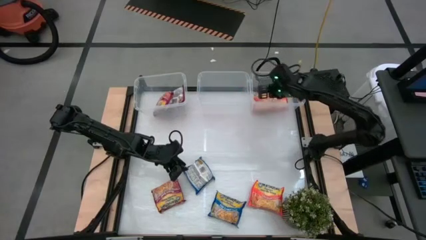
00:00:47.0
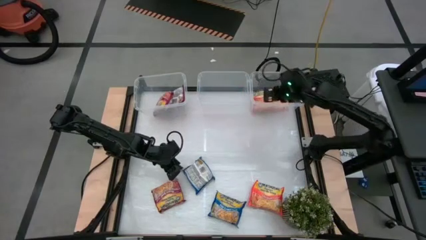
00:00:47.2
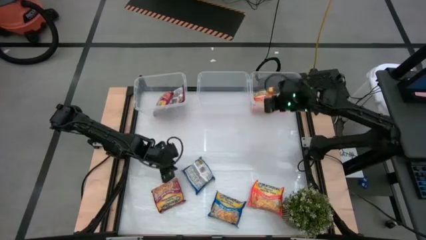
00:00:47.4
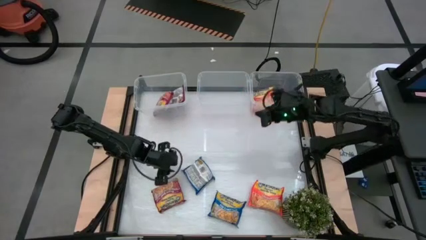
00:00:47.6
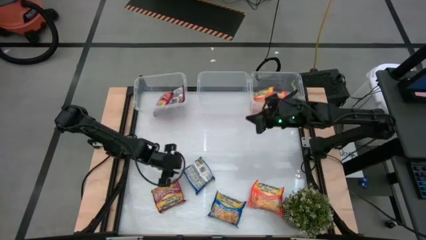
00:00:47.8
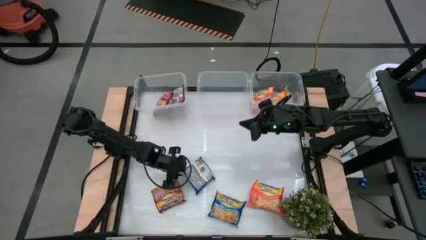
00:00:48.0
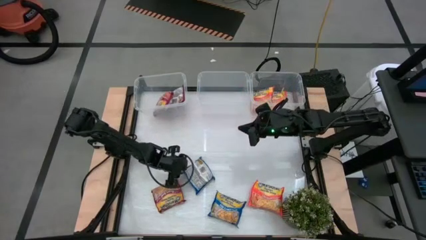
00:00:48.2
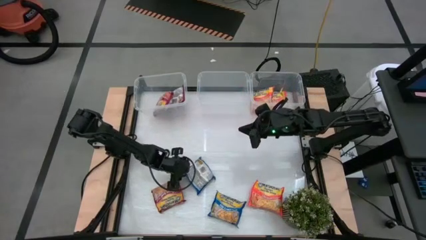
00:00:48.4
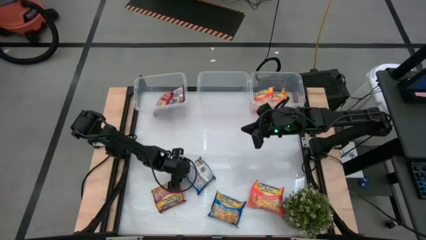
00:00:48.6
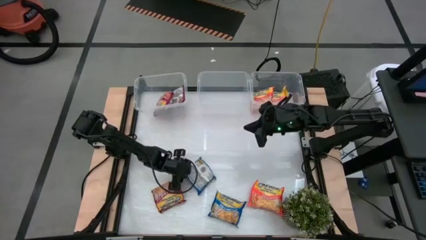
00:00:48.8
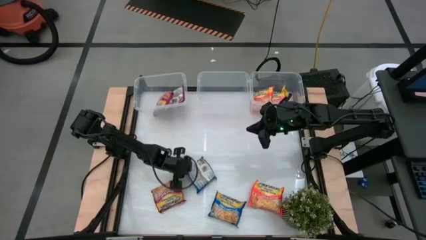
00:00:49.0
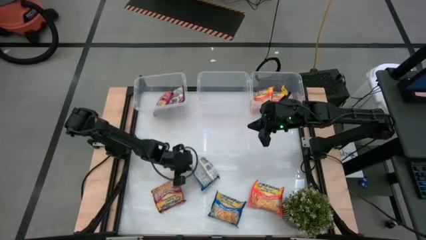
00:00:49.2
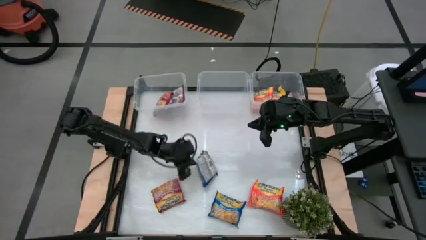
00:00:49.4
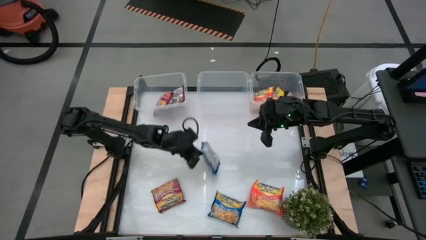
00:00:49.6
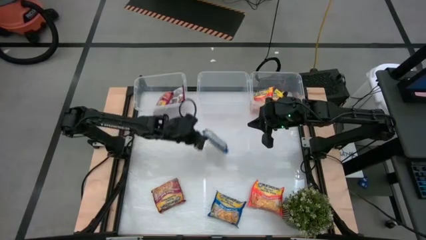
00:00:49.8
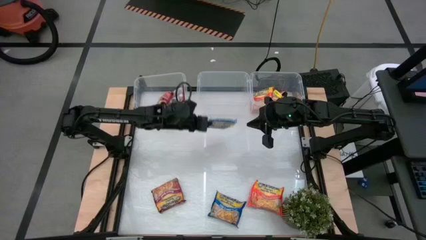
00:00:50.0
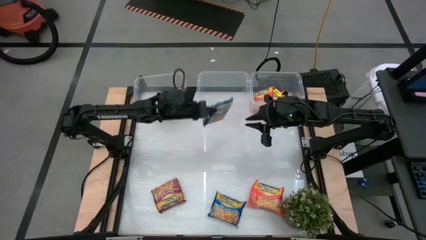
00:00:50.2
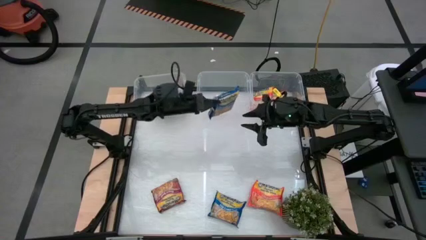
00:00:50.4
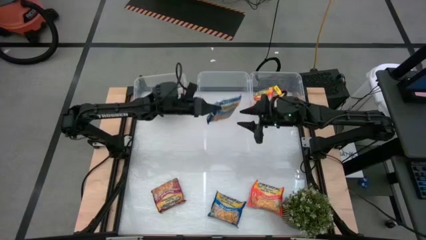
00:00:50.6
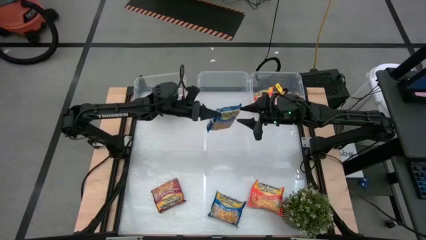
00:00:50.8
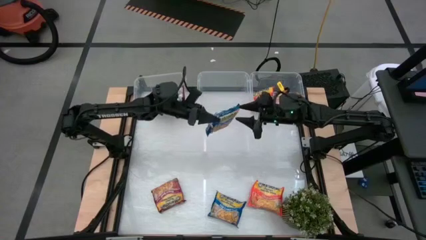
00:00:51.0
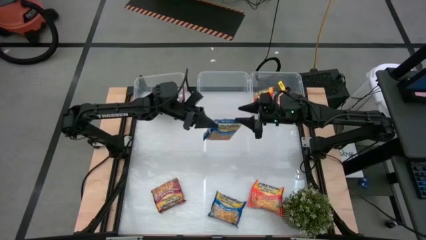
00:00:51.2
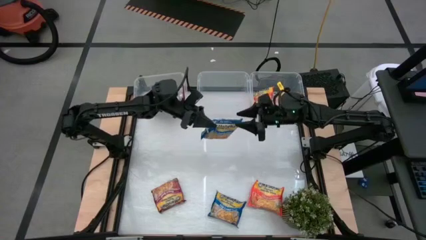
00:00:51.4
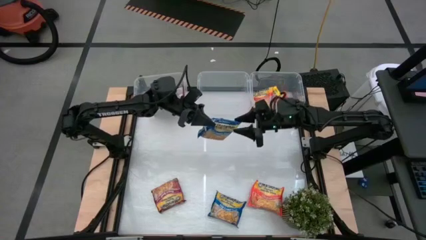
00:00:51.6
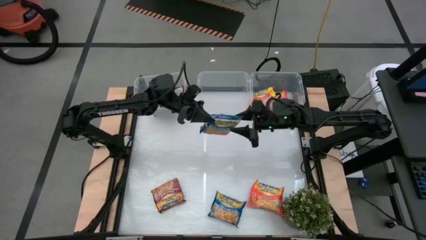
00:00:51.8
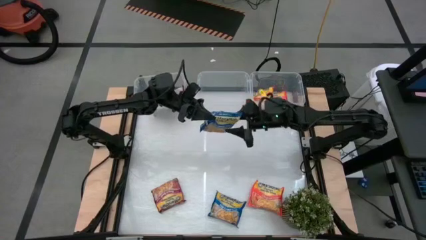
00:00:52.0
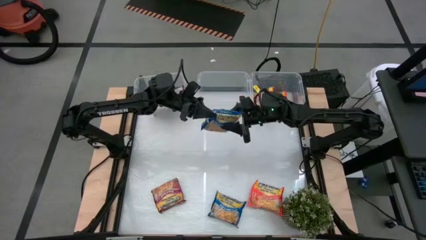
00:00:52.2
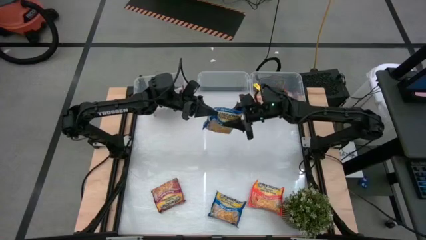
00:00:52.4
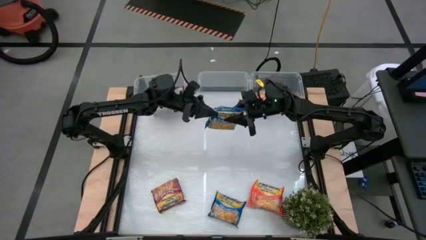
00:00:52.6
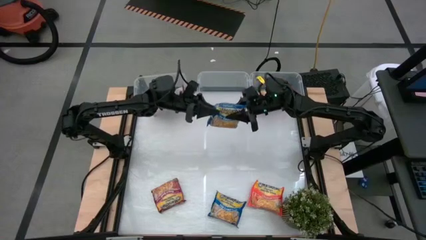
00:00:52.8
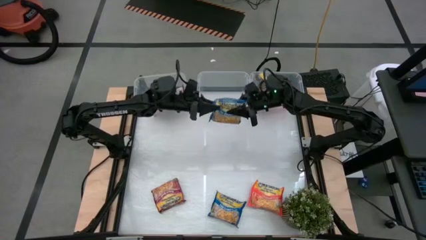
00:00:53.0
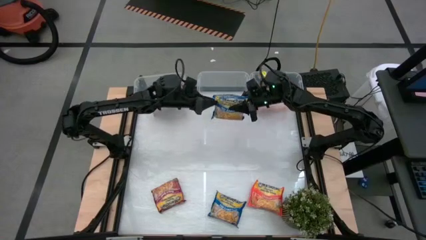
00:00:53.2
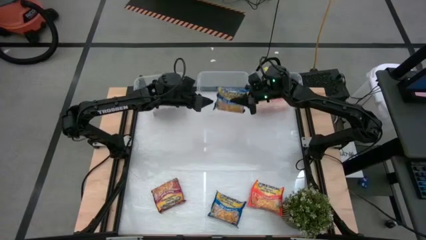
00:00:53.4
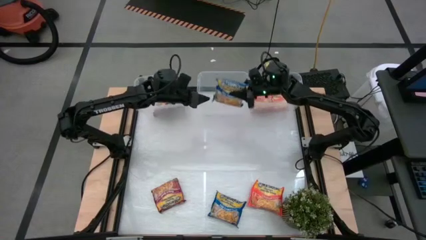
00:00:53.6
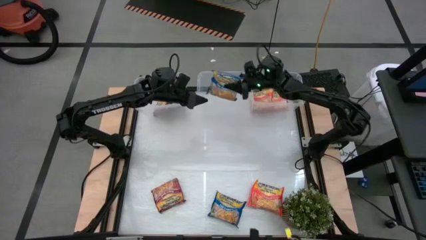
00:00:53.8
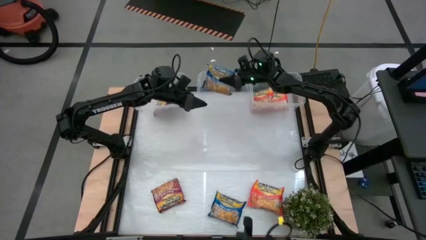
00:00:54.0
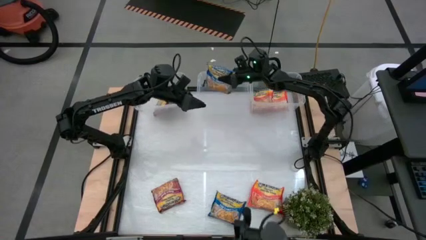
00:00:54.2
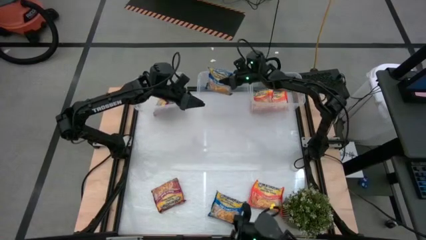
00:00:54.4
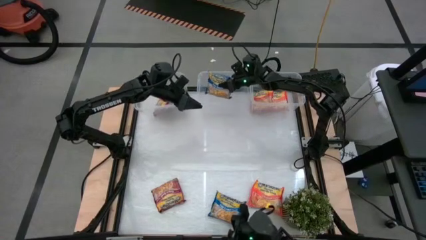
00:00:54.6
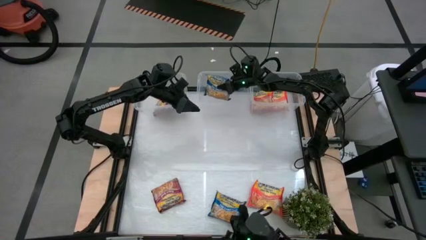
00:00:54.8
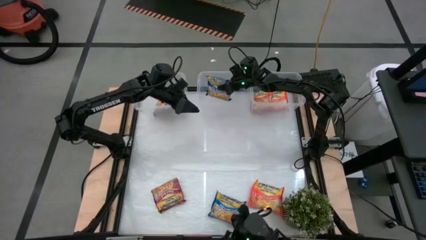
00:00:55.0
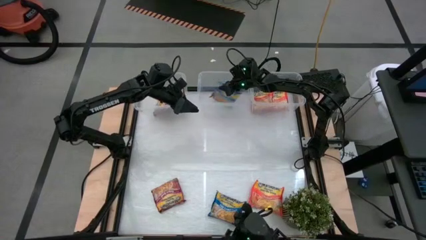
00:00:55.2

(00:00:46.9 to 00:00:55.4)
Task: Sort Maruchan noodles
Put the top blue noodle pack into the middle transparent bin

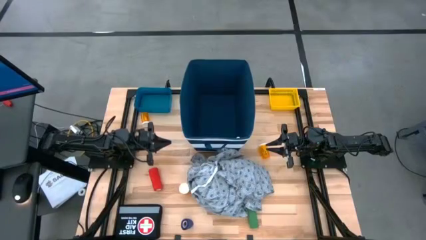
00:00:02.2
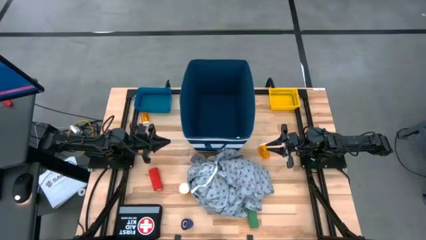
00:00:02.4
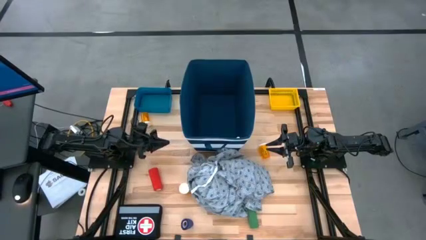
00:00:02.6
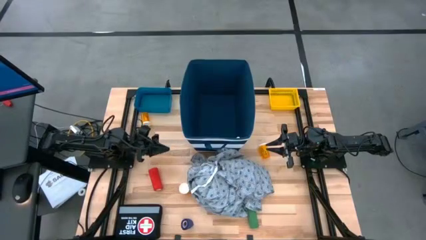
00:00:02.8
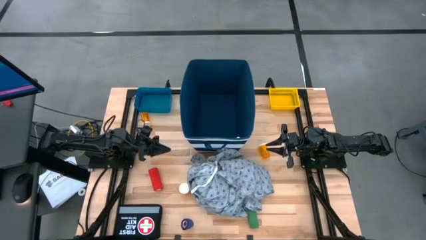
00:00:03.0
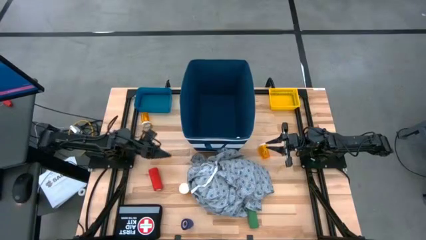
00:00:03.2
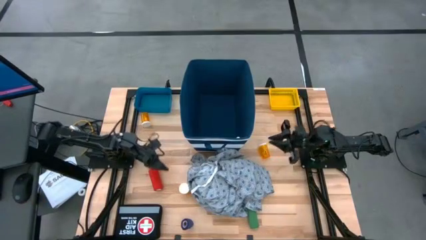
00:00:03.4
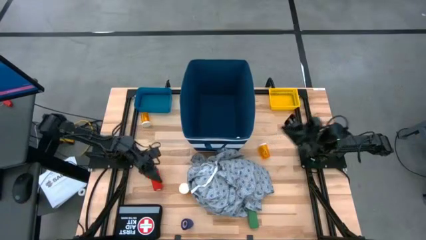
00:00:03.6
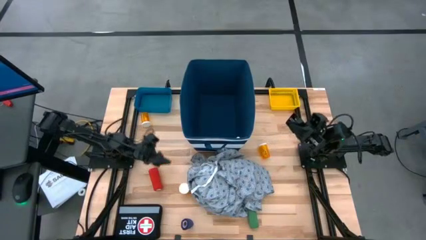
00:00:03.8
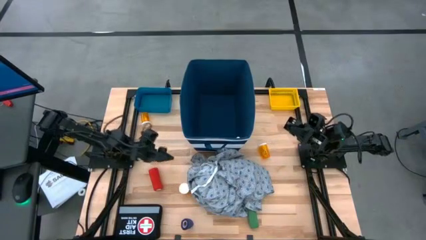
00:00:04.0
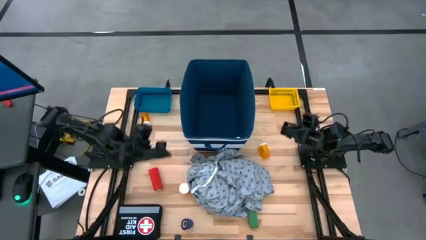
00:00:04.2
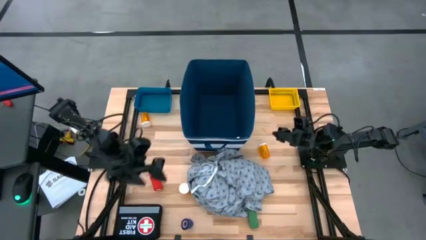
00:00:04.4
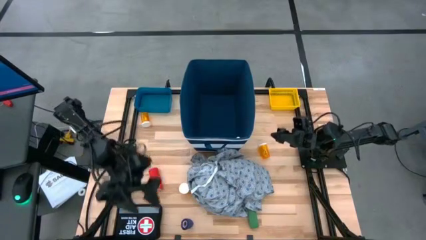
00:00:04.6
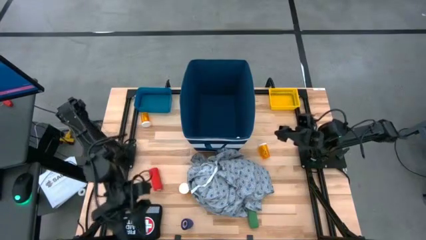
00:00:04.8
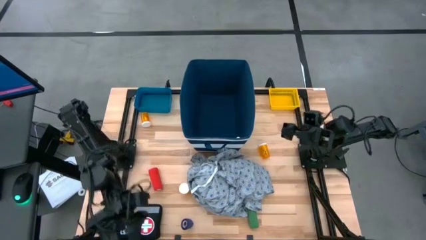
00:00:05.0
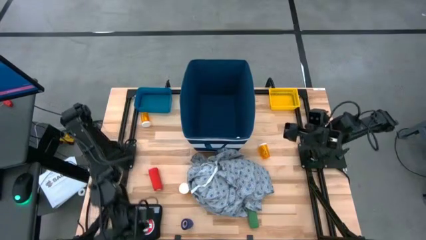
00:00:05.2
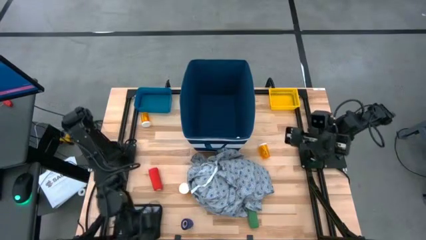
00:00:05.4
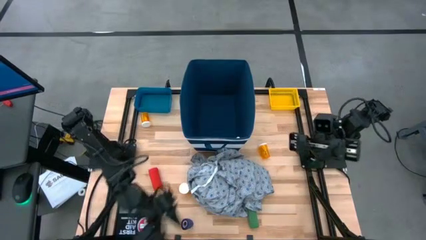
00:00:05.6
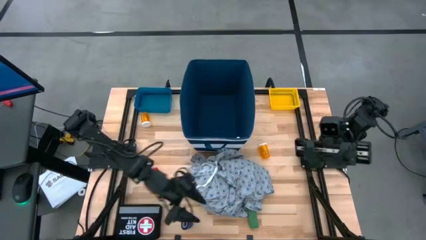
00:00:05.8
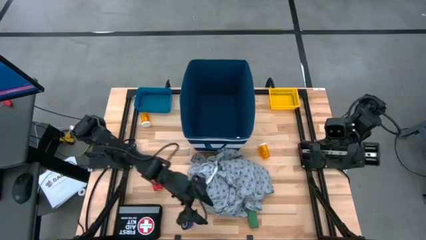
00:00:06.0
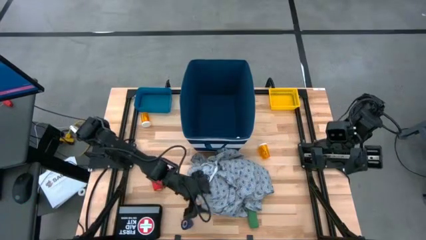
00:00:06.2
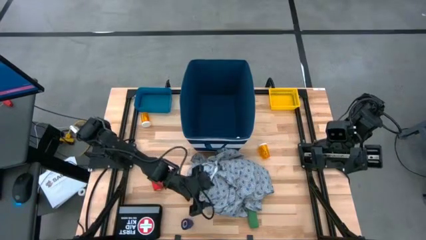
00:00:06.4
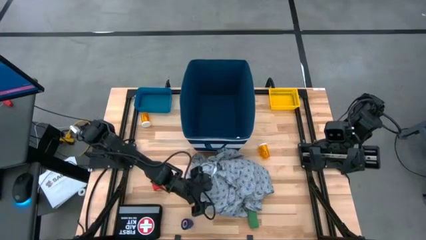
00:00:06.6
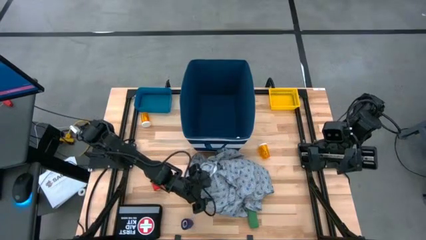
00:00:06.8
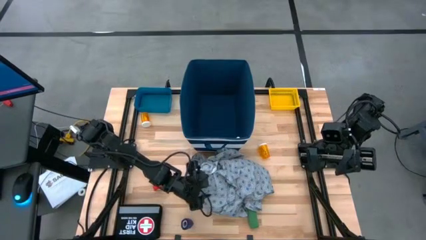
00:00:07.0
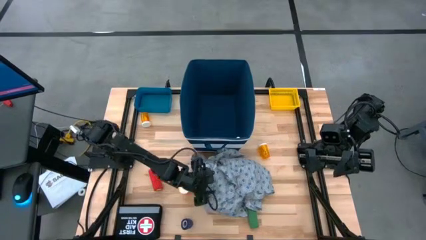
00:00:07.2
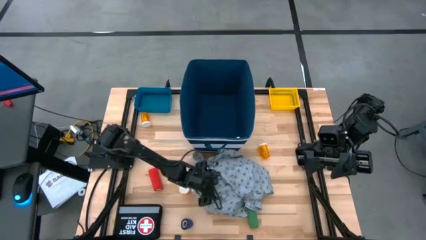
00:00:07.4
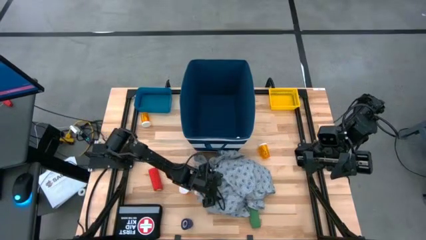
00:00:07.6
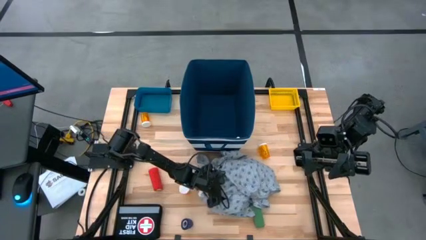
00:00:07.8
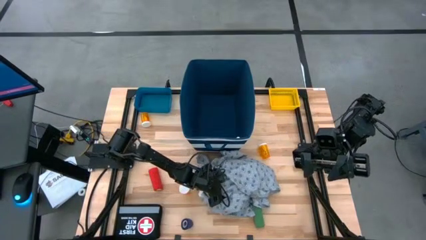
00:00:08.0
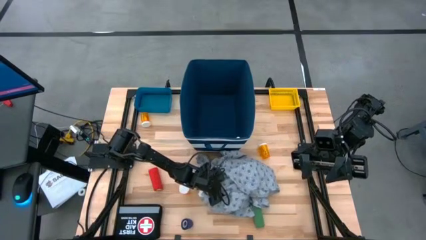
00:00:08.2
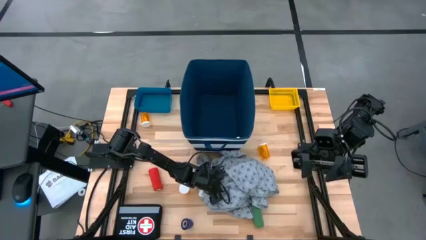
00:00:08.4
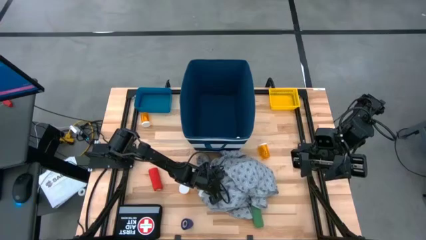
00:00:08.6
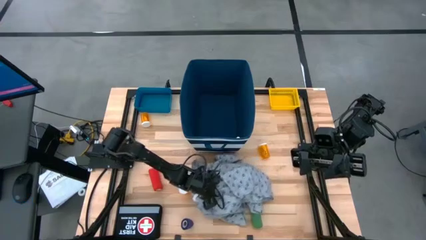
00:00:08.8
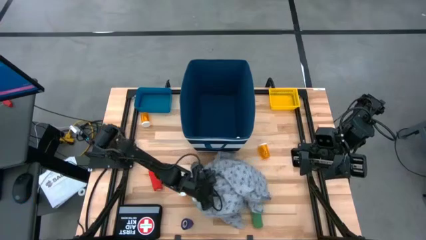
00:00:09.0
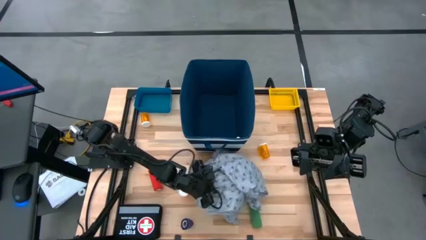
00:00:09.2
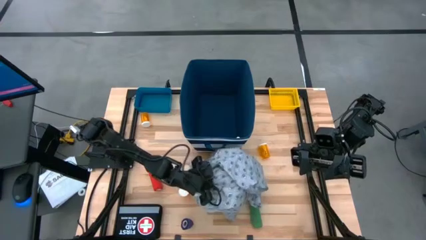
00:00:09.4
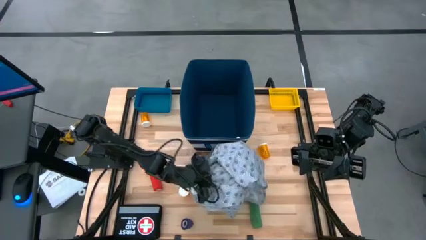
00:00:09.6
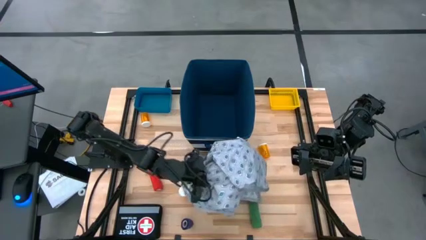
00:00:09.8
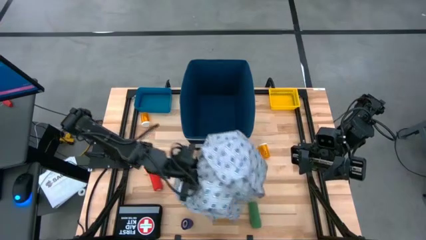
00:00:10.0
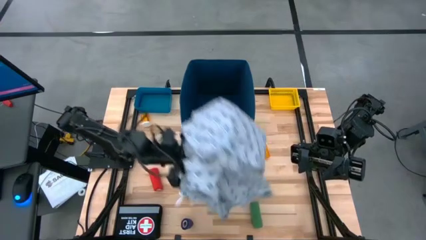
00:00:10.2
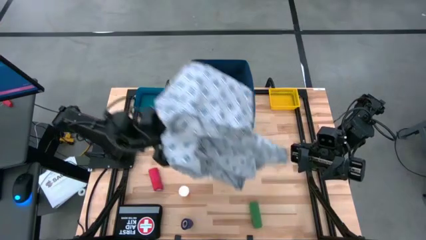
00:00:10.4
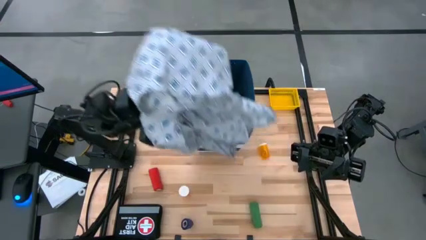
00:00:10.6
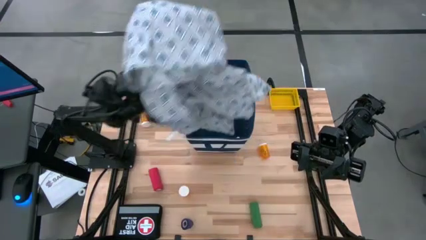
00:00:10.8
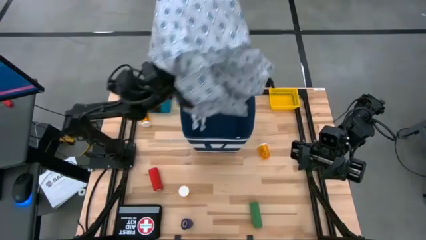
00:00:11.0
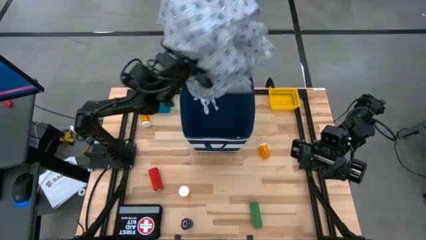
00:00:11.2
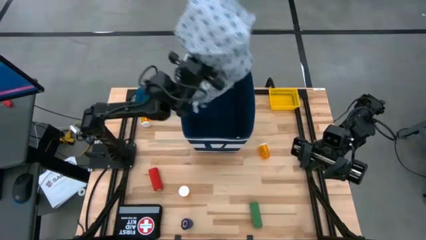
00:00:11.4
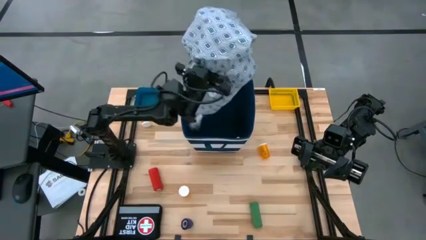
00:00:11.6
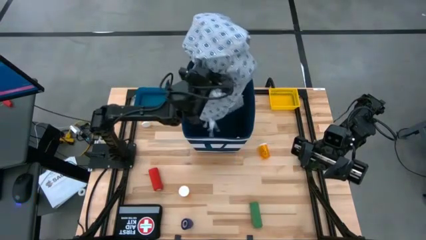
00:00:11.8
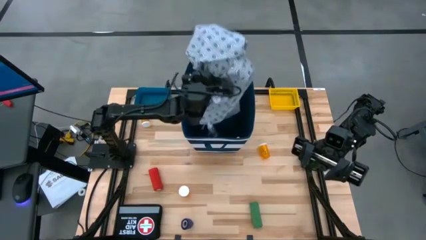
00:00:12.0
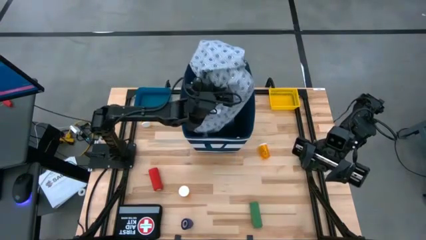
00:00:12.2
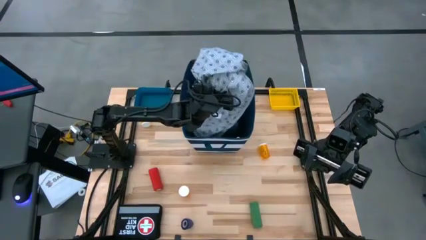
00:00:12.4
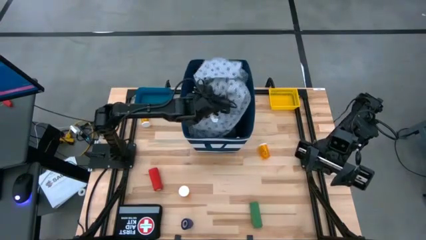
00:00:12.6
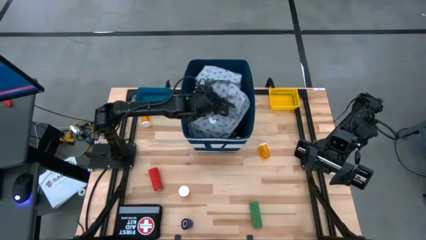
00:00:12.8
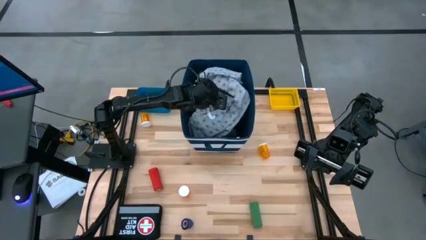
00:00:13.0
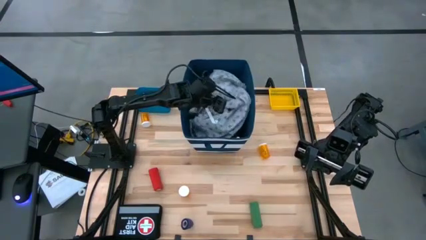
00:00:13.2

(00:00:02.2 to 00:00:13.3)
Task: Pick & place medical supplies in basket/bin
Put the gray patterned patient gown into the blue bin
